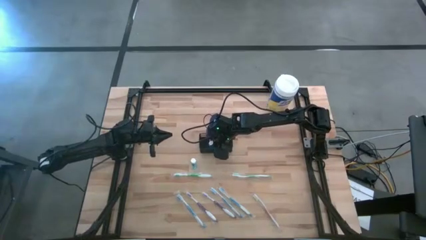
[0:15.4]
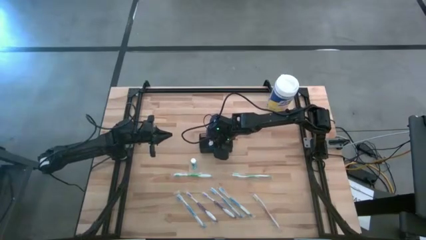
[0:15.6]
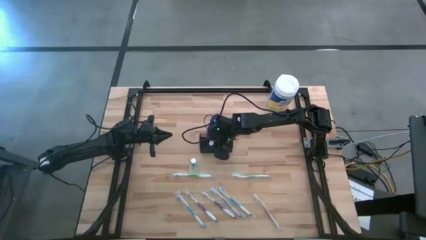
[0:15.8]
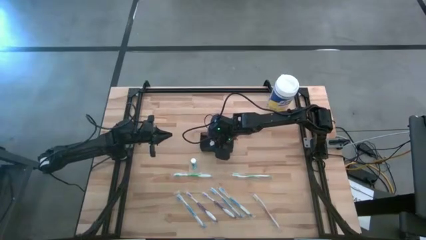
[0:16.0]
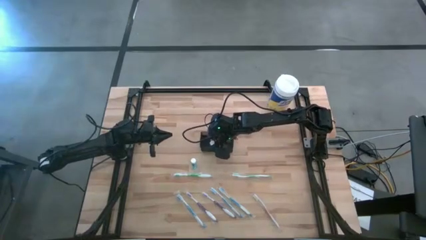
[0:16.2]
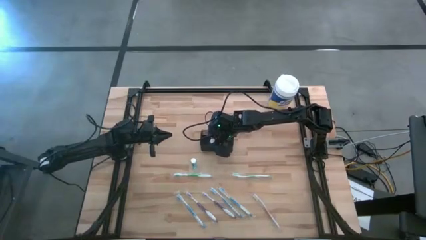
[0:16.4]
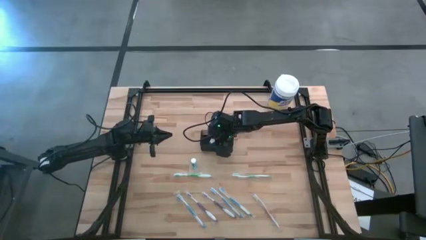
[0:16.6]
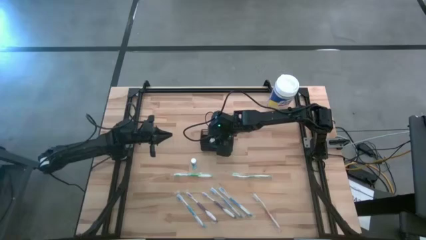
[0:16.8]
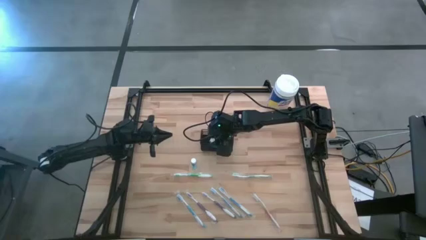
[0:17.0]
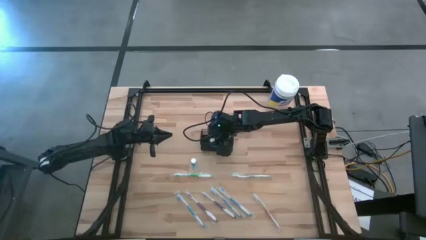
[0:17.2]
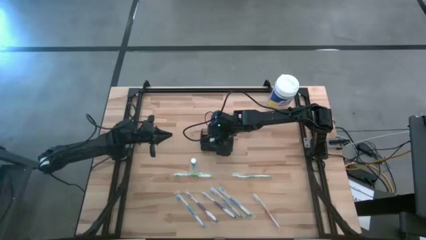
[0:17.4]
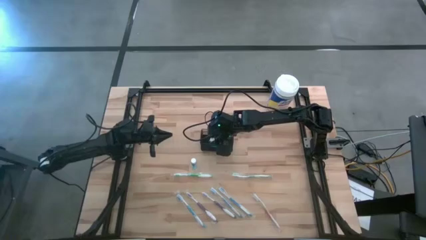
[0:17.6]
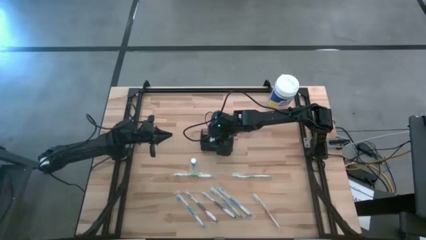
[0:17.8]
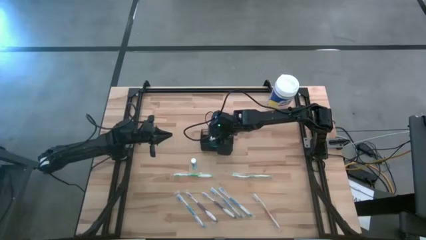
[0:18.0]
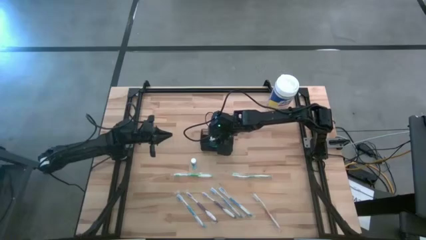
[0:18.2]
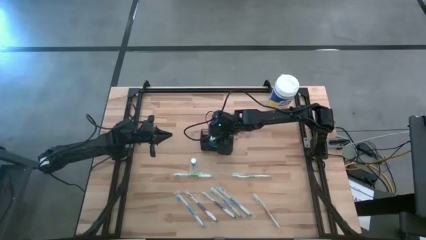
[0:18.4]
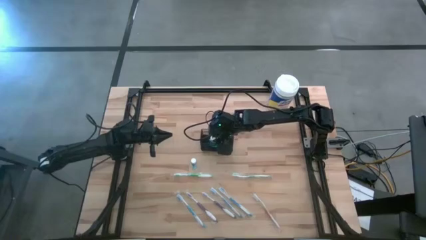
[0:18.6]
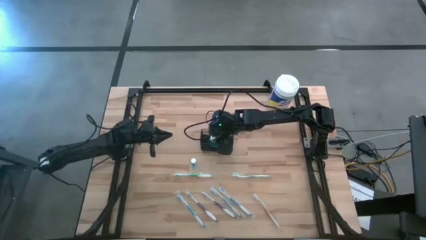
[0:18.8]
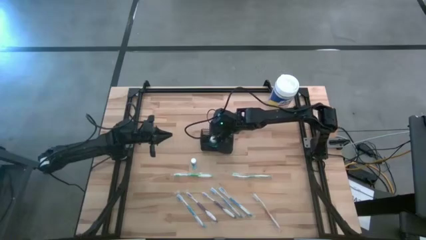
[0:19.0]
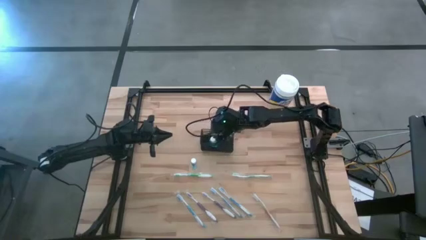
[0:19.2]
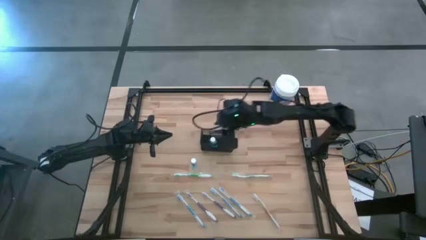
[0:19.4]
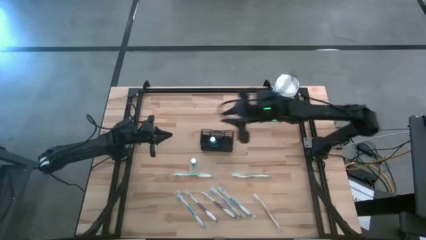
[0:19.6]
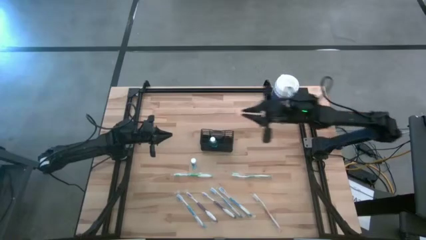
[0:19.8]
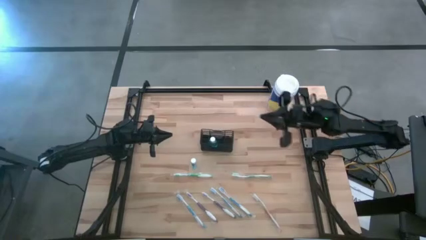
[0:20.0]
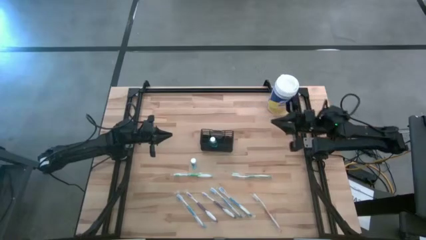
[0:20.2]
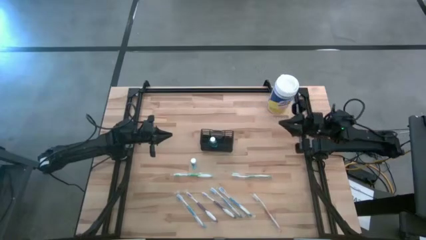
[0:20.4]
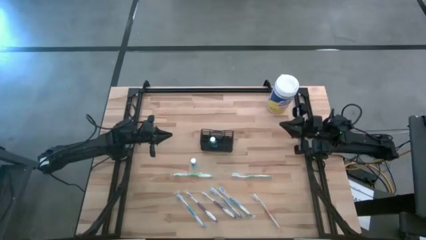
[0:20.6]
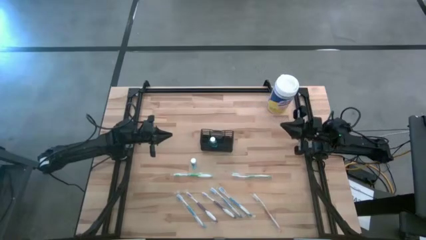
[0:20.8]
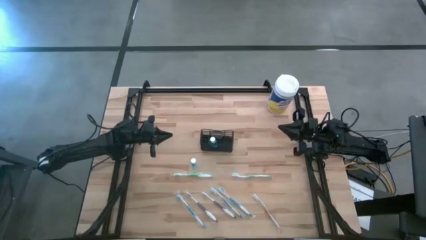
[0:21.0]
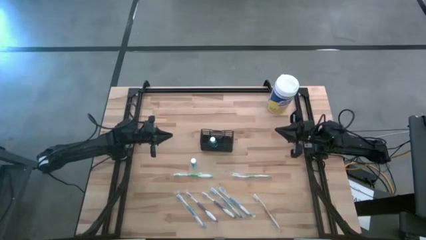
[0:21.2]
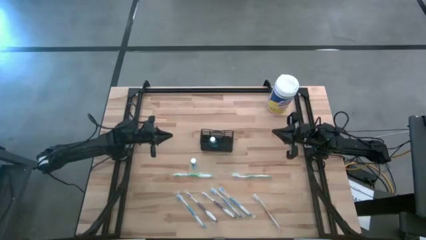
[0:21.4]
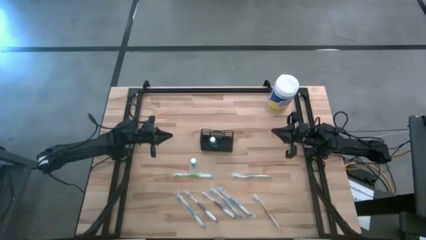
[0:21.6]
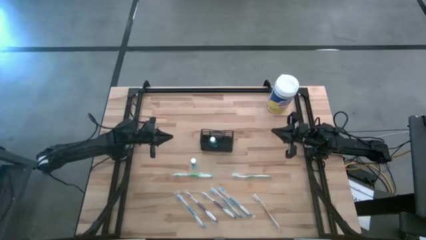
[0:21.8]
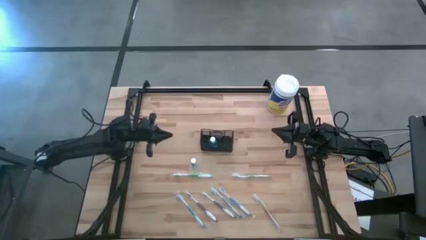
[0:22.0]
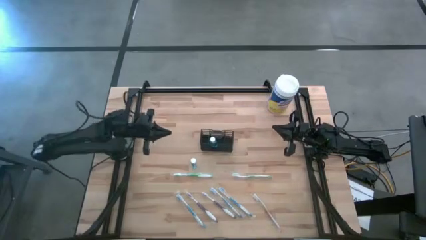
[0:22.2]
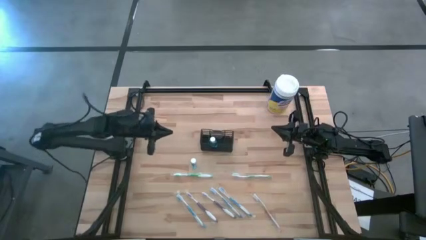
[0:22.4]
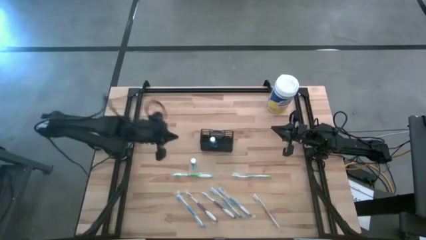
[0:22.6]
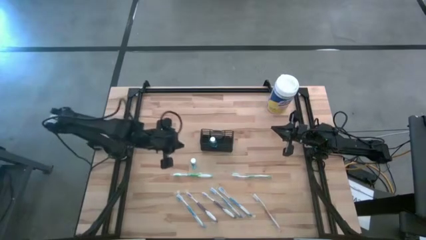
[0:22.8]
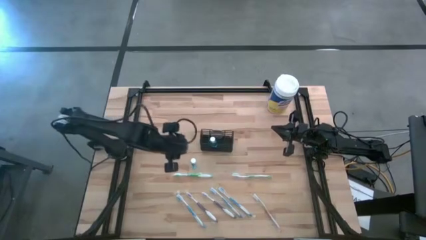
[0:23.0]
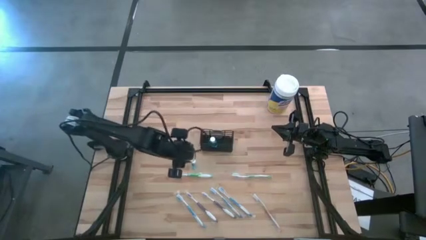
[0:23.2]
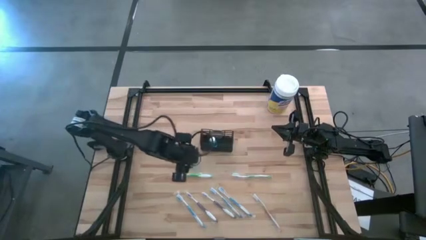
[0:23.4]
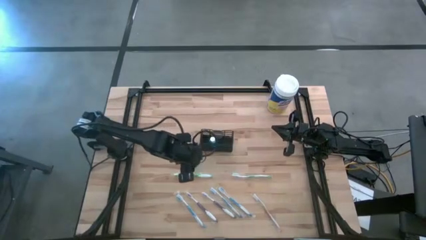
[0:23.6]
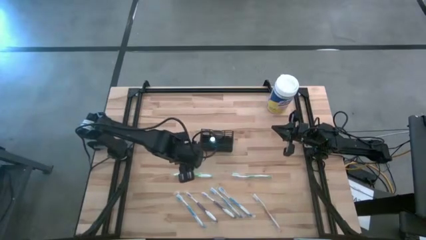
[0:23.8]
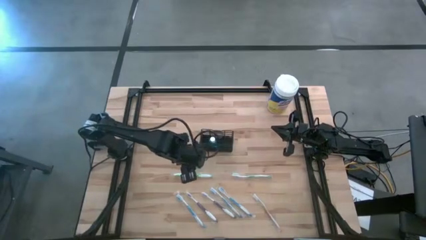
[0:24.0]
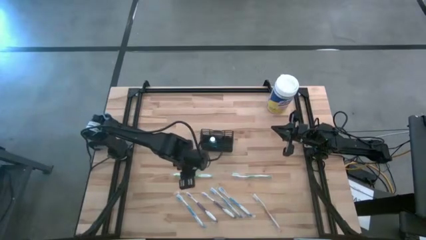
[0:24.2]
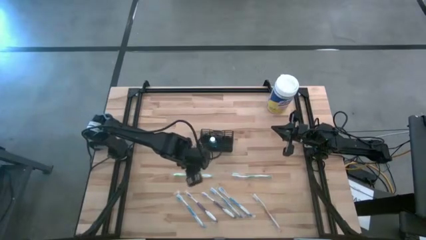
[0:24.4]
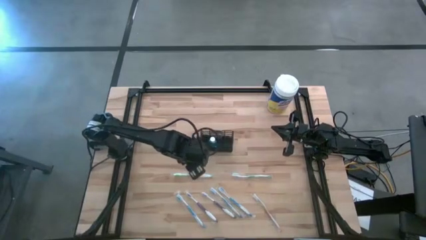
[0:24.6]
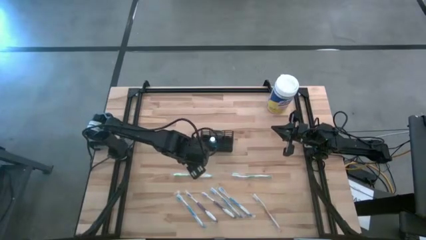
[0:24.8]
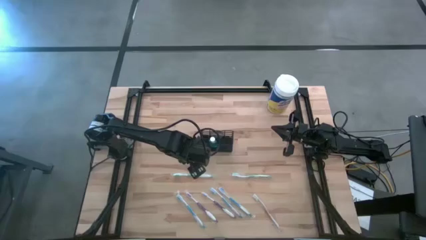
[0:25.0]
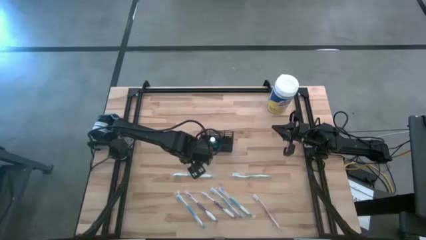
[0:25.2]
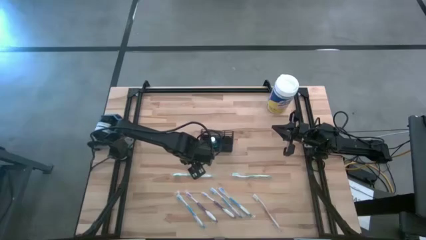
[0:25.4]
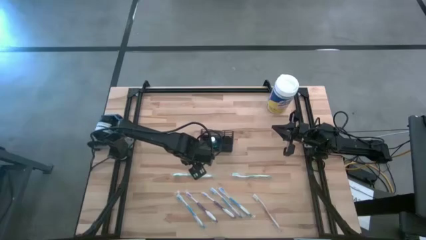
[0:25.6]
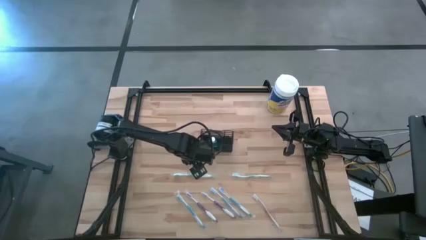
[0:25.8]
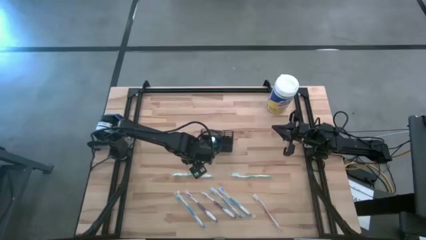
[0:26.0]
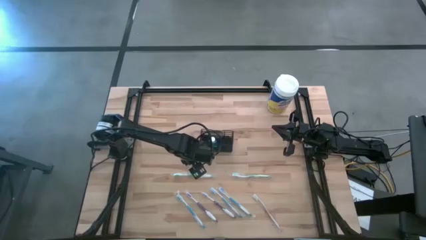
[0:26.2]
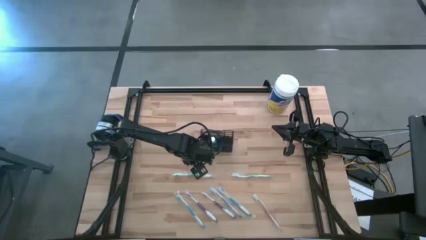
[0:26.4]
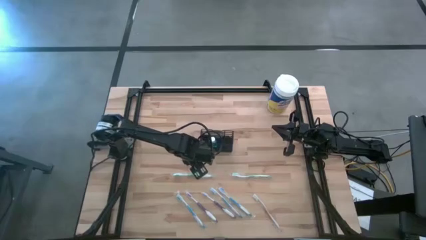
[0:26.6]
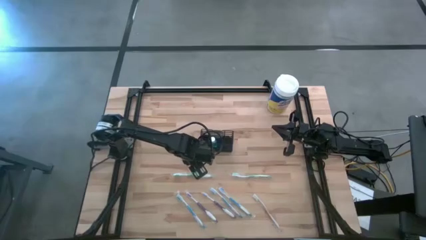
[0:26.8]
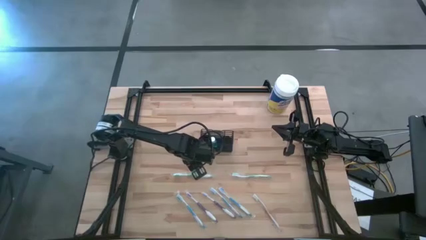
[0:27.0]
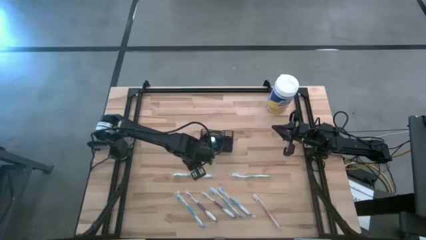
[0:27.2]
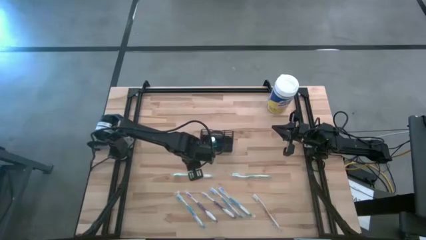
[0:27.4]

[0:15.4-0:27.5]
Task: Pick & Place toothbrushing station
Put the mouthwash into the wire organizer

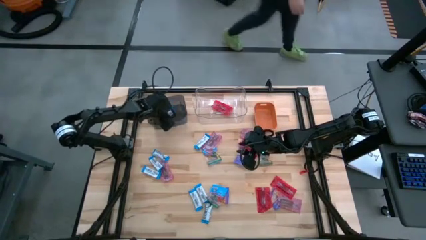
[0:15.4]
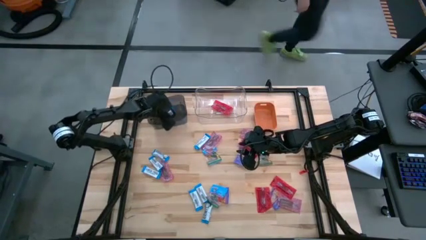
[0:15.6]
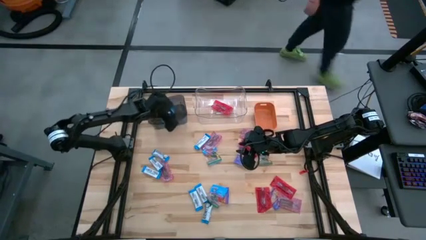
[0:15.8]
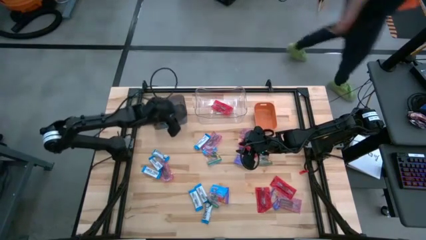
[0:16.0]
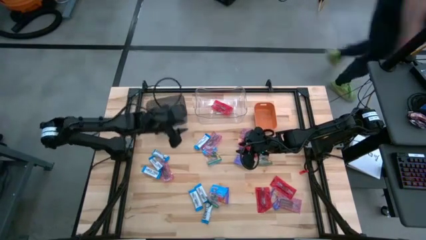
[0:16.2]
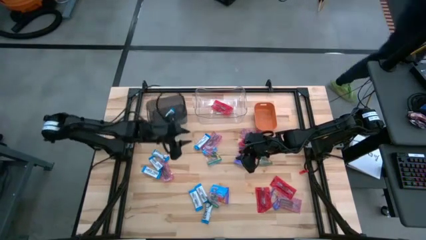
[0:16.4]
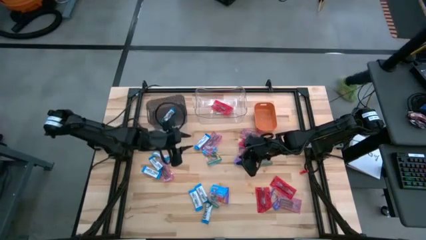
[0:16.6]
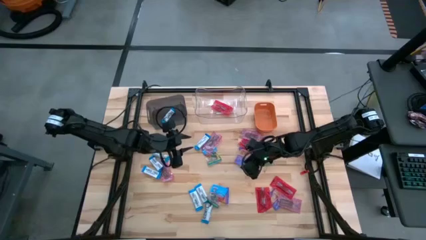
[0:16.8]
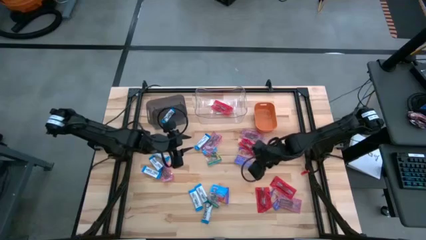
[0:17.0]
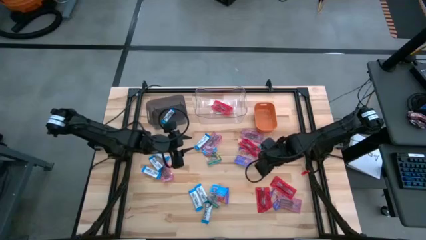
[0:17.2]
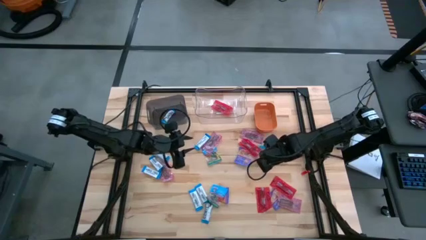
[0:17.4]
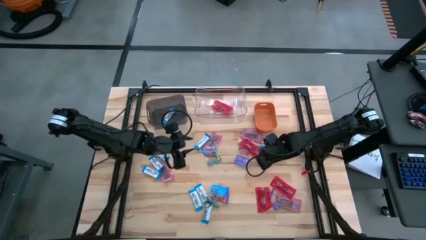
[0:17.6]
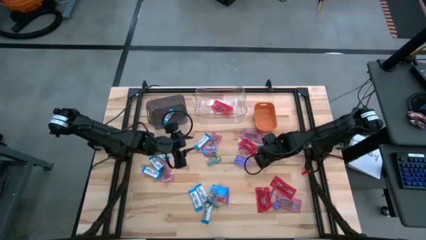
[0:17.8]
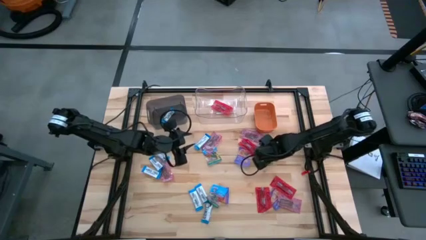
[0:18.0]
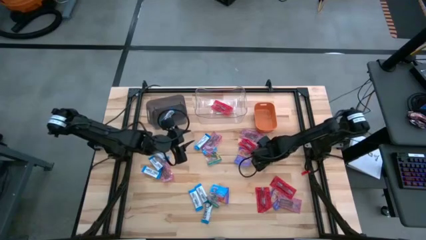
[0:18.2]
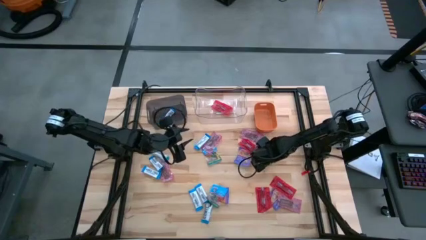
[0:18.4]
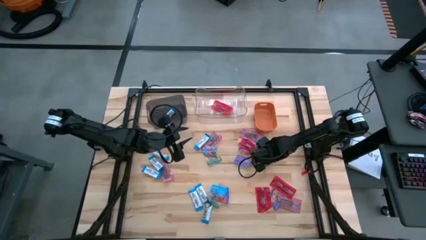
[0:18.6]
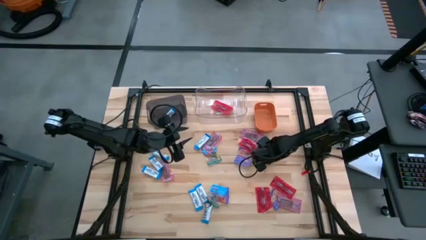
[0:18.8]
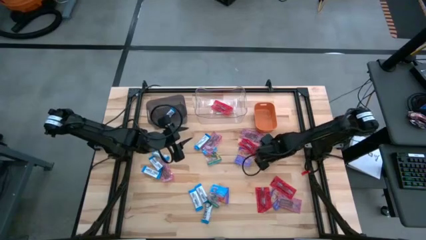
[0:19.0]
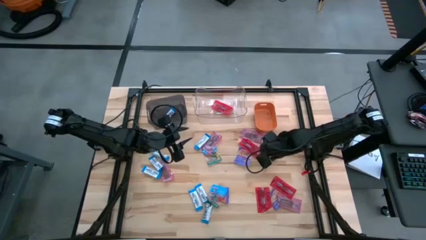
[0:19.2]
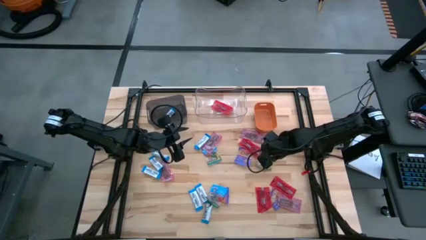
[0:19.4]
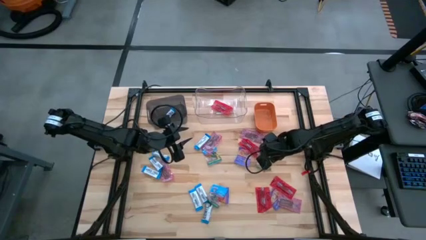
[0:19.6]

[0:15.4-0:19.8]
Task: Sort candy
Put the blue gummy into the orange bin
